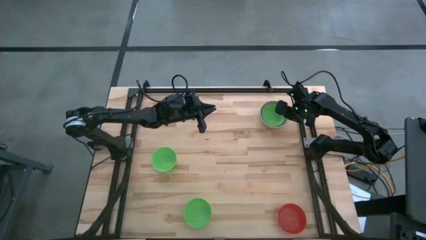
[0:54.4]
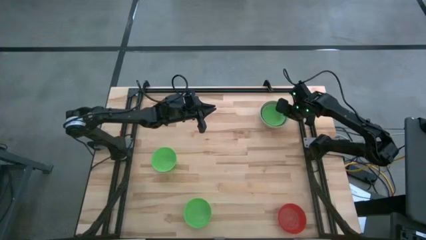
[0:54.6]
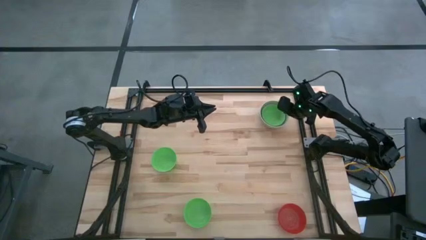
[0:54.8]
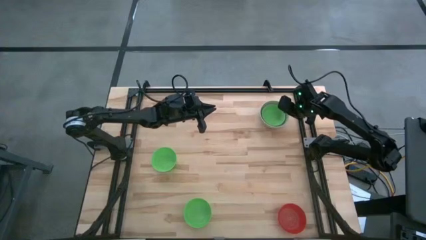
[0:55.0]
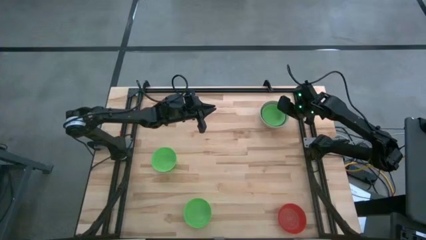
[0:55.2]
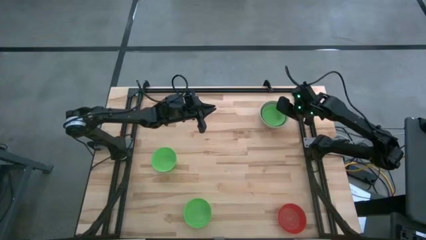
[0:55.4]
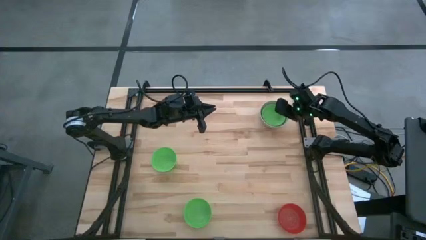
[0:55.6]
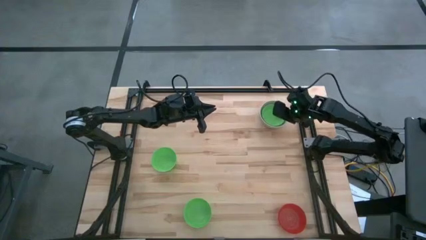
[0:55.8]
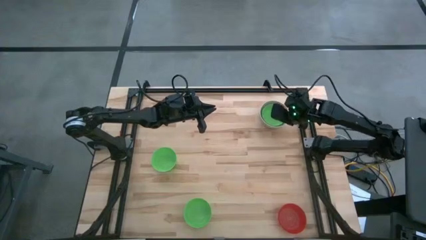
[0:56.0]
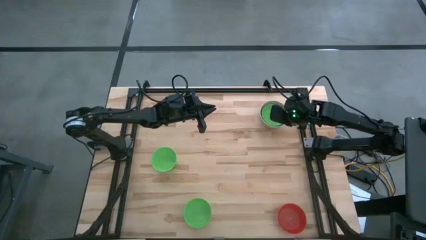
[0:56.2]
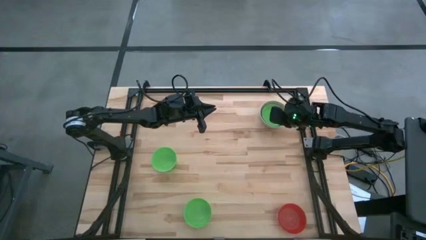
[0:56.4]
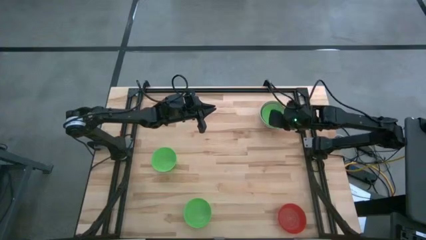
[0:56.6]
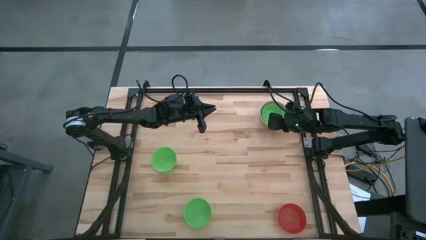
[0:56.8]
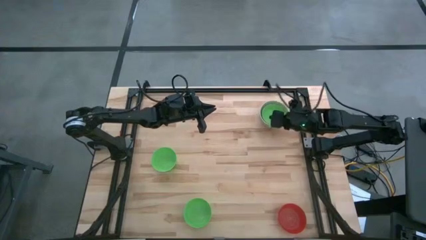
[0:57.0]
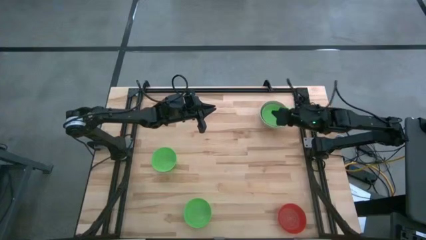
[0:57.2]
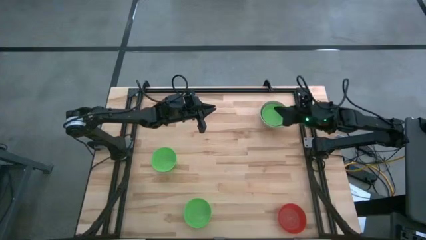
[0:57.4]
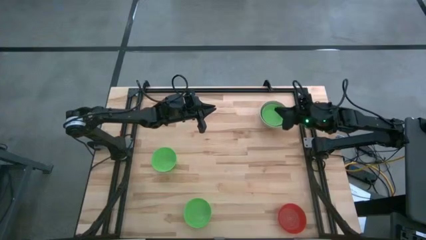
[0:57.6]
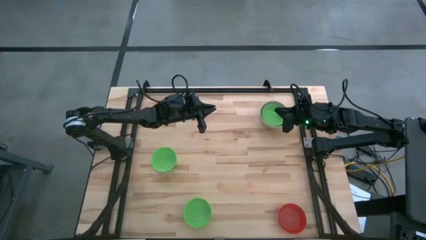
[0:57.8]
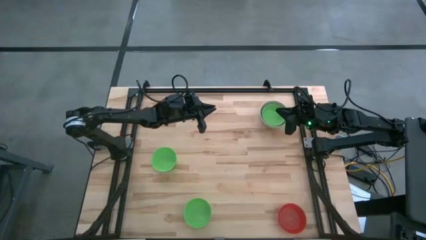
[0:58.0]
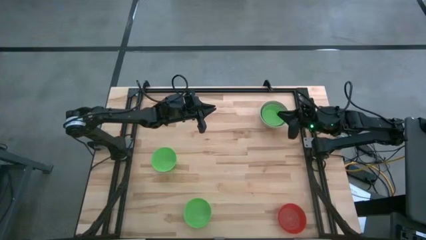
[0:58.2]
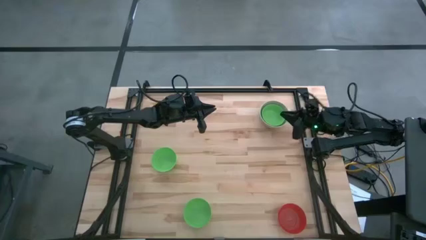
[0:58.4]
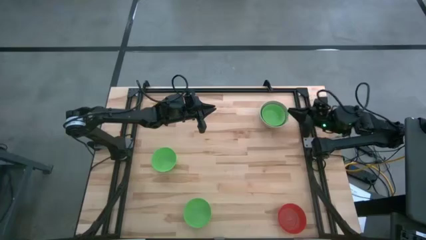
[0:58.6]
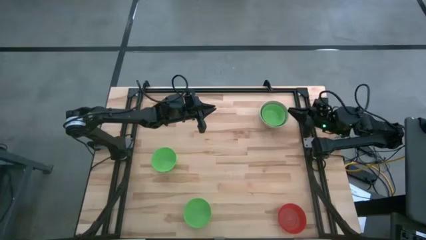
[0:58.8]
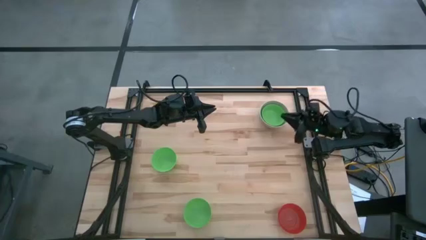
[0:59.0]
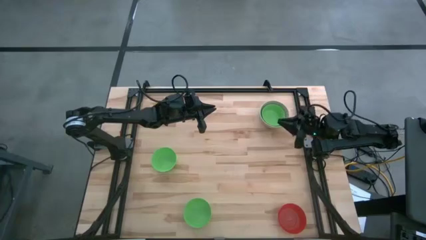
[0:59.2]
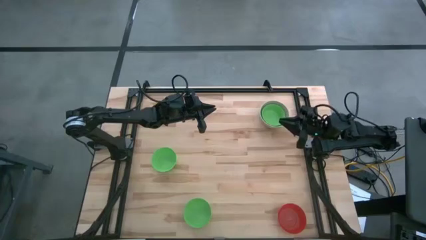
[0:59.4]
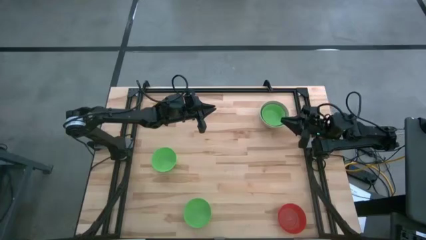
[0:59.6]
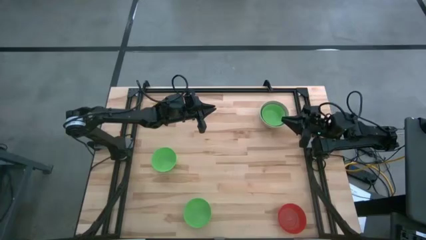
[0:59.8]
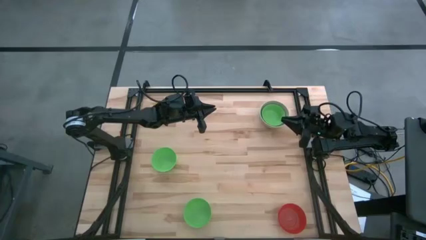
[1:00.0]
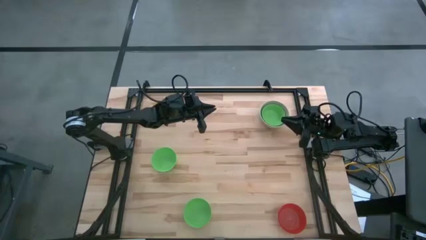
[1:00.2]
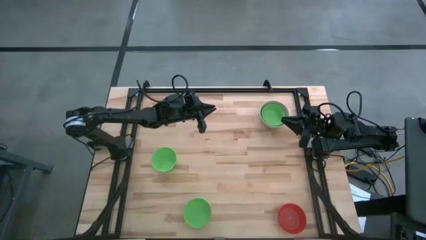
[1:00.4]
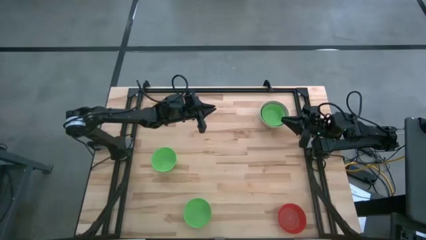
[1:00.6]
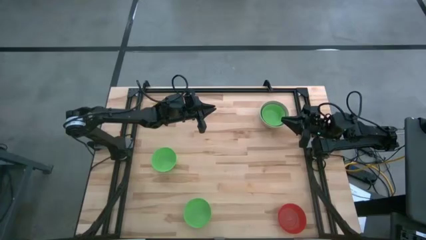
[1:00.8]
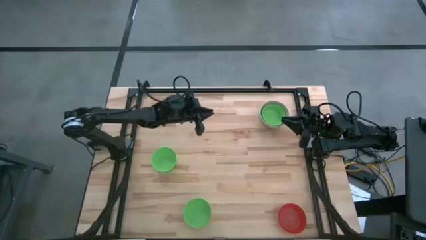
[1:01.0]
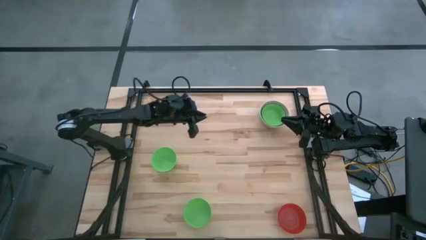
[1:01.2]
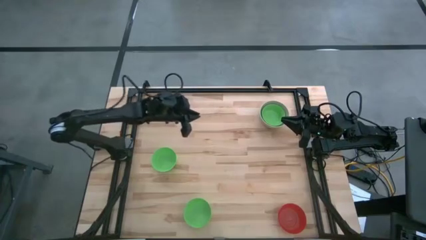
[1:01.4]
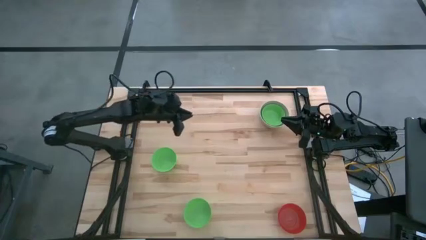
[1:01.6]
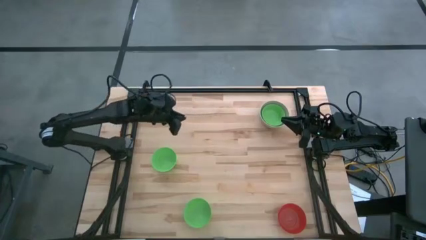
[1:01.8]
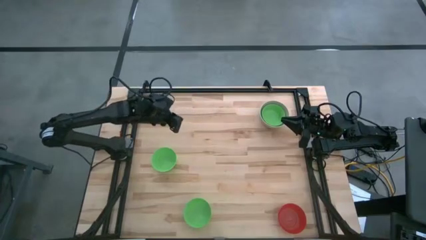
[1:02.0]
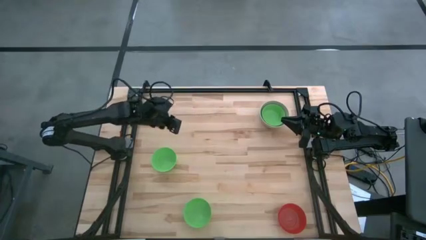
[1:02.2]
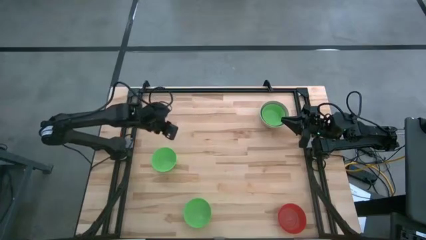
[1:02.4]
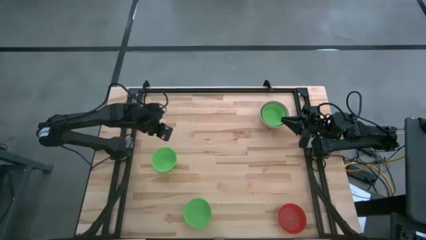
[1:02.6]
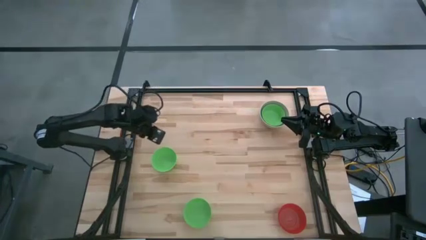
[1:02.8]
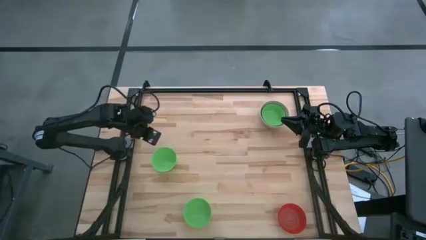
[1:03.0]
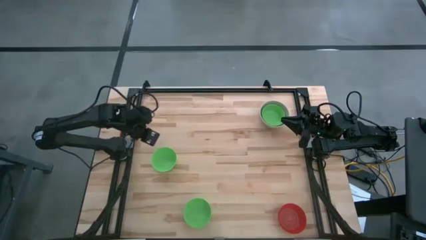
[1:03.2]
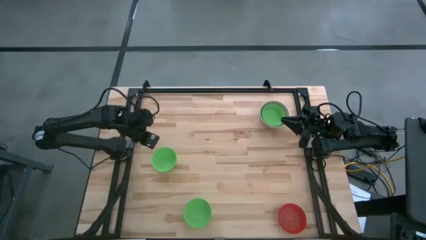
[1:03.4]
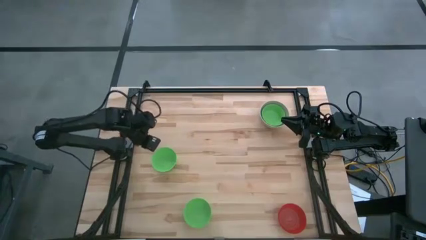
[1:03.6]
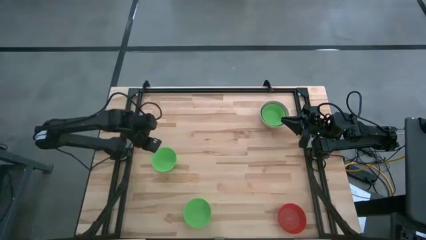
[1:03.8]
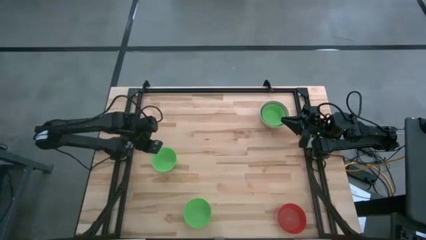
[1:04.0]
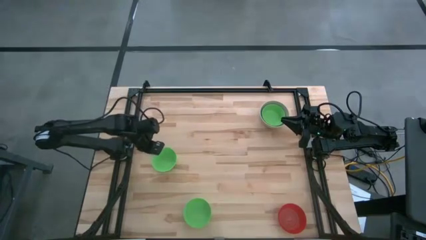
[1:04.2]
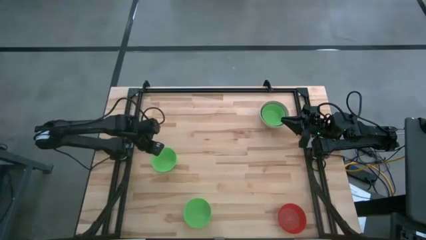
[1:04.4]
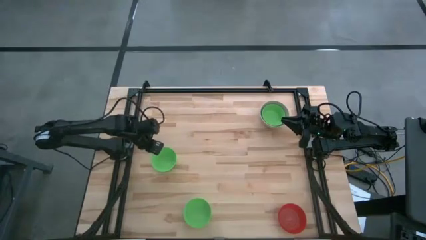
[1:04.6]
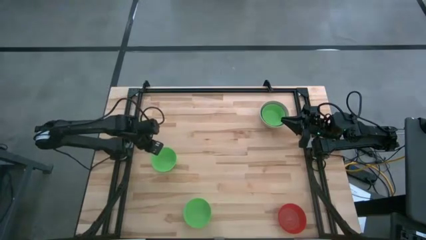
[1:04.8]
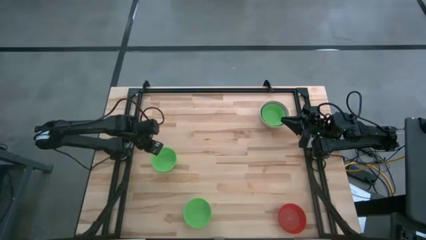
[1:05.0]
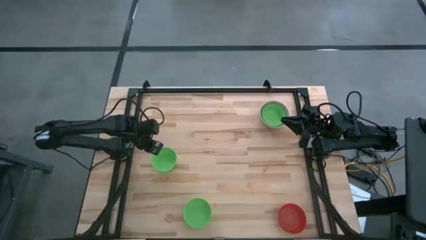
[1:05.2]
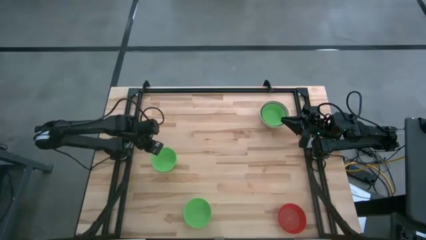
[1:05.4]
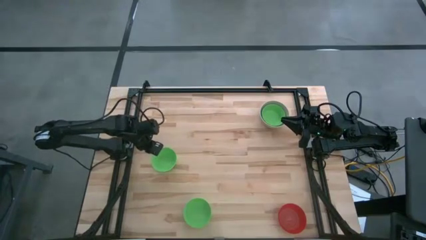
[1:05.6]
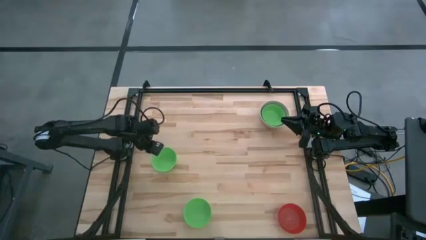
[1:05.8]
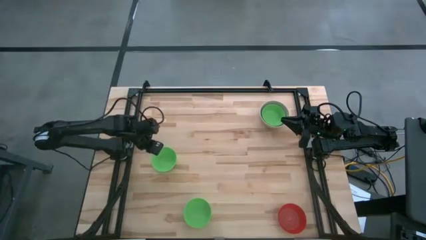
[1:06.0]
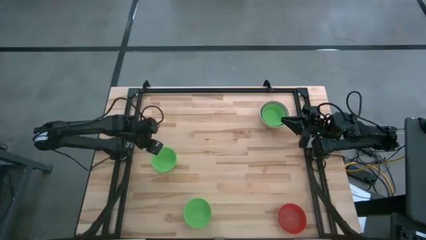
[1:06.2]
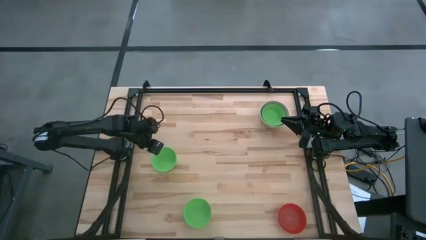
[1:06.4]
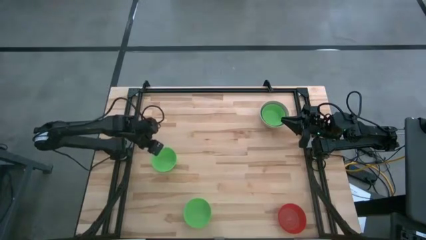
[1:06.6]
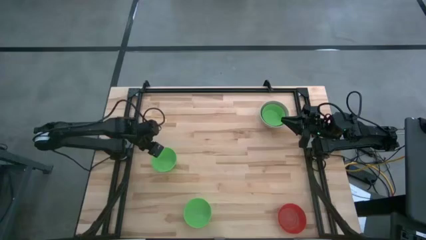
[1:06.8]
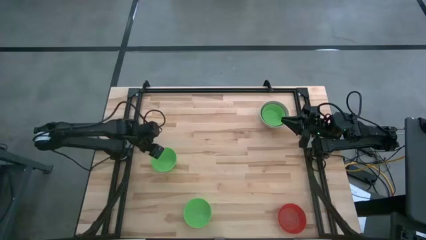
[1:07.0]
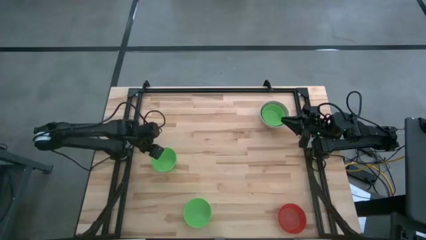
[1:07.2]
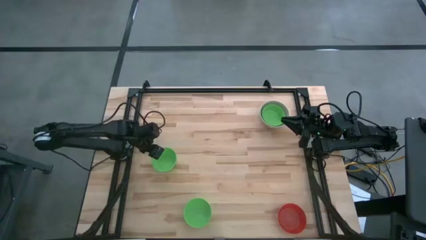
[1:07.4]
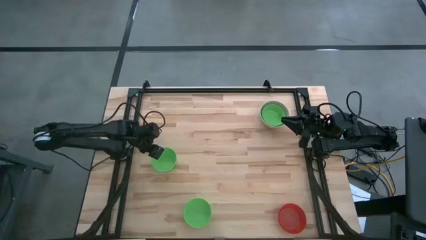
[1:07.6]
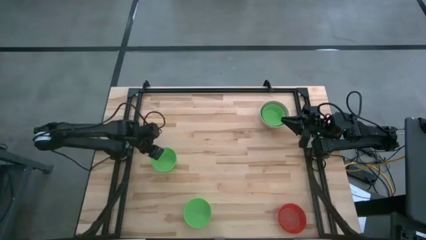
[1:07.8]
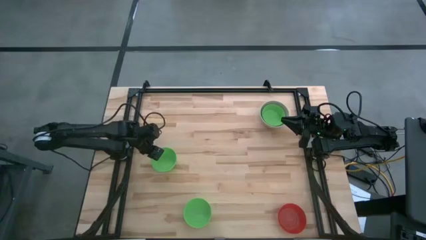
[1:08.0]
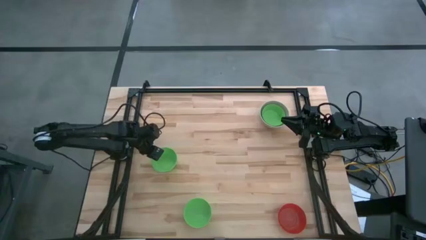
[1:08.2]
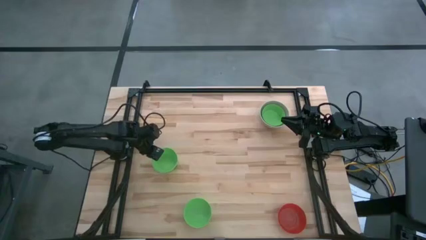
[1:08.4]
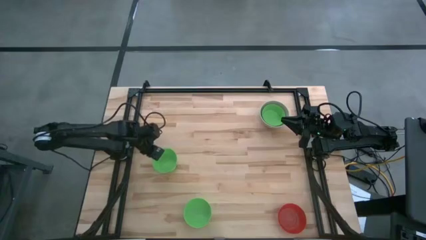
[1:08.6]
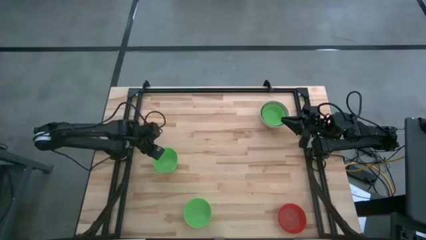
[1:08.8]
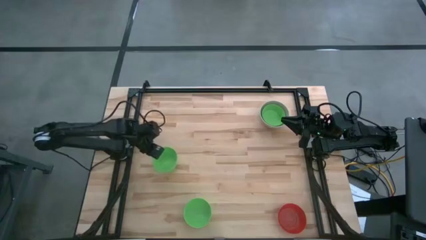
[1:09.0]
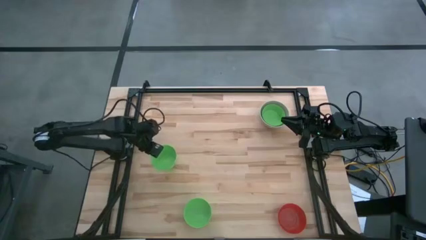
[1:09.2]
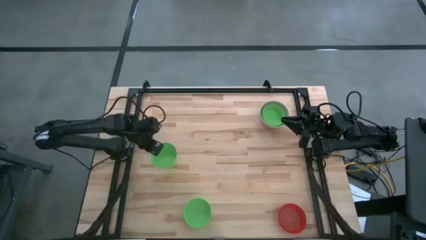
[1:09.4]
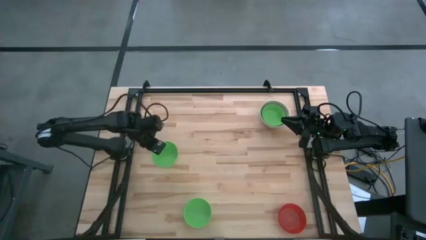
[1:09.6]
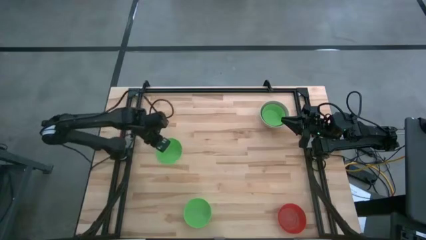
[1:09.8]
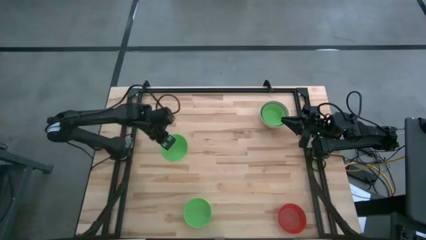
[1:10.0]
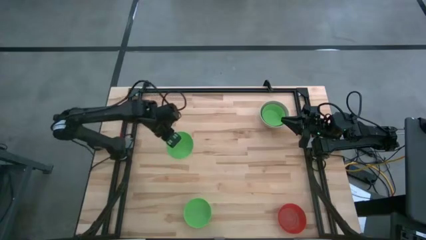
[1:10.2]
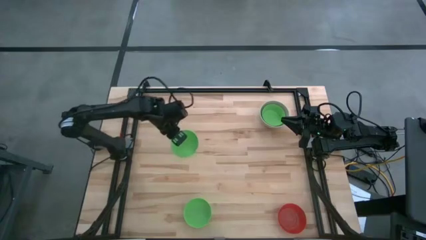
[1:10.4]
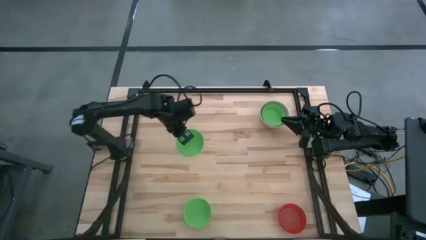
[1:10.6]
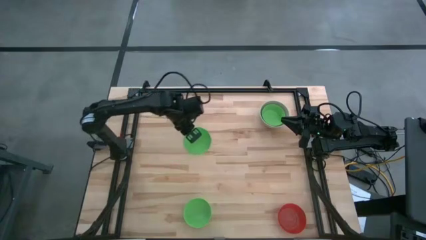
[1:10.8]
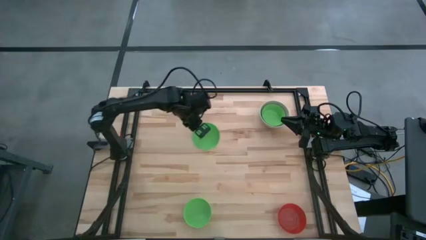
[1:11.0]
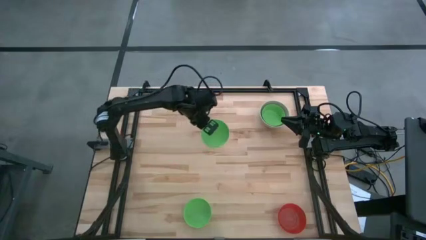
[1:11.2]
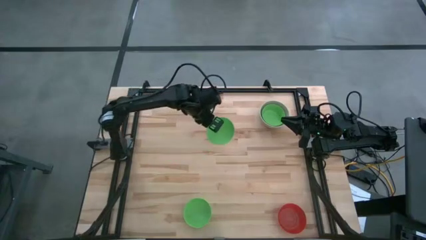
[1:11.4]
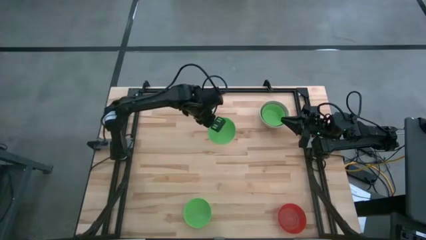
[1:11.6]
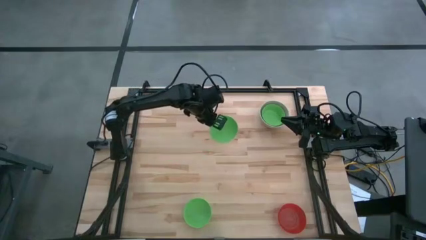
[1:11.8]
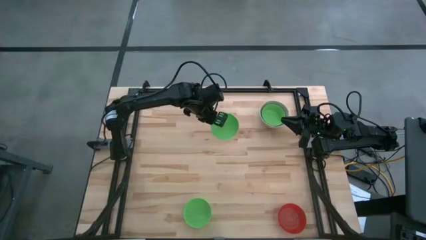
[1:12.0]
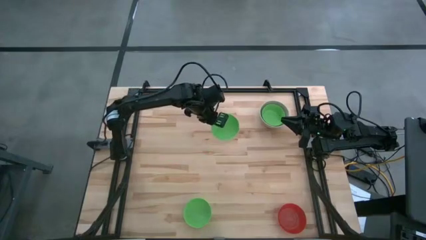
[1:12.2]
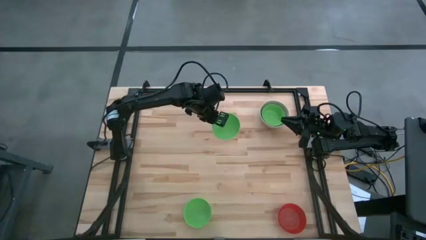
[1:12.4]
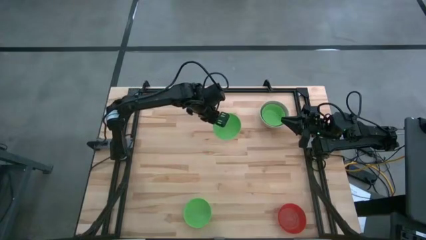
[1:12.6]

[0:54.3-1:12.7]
Stack the top green bowl on top of the green bowl
